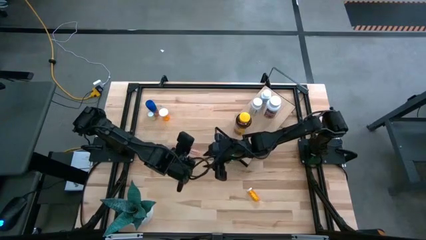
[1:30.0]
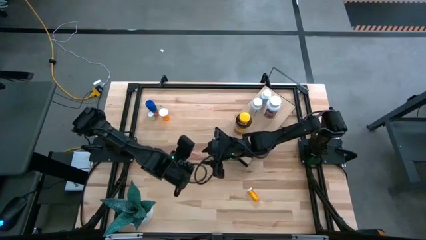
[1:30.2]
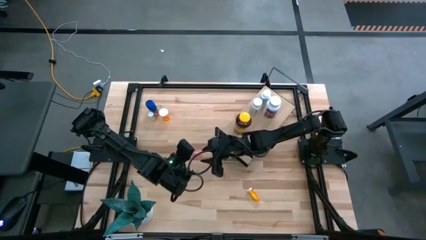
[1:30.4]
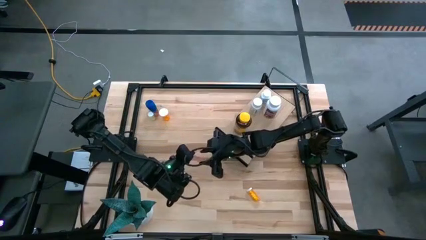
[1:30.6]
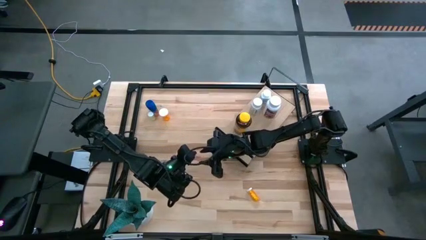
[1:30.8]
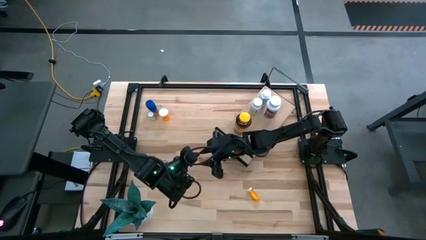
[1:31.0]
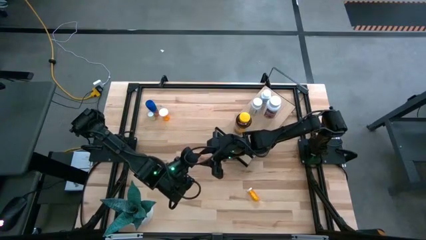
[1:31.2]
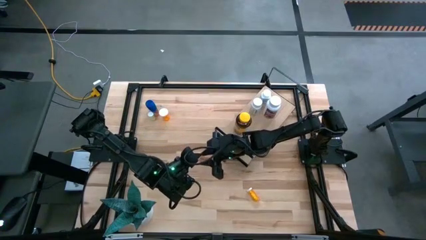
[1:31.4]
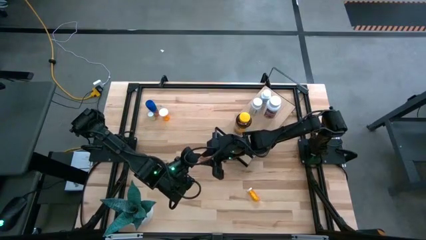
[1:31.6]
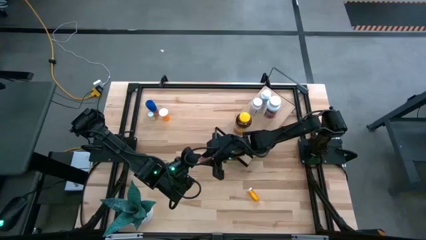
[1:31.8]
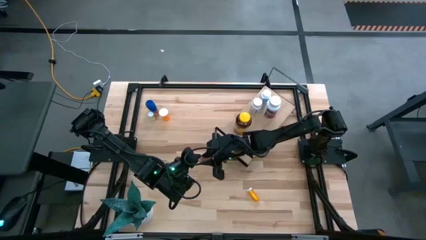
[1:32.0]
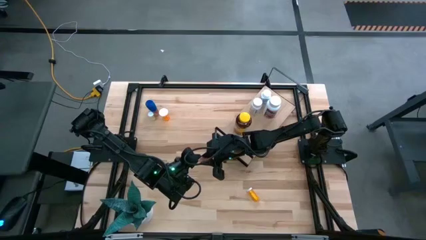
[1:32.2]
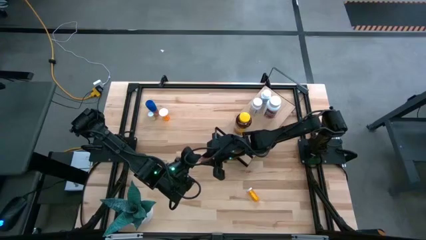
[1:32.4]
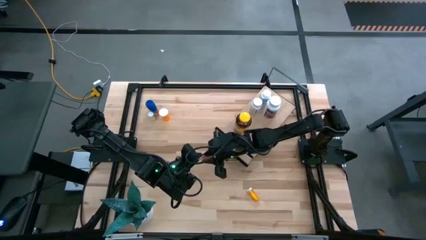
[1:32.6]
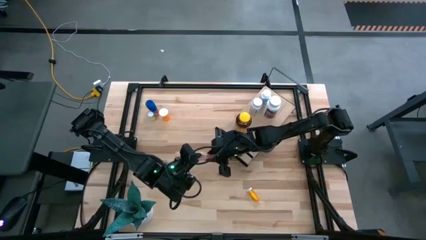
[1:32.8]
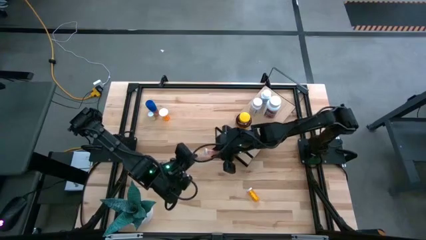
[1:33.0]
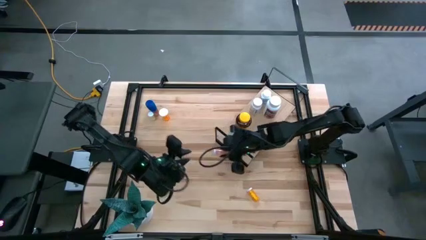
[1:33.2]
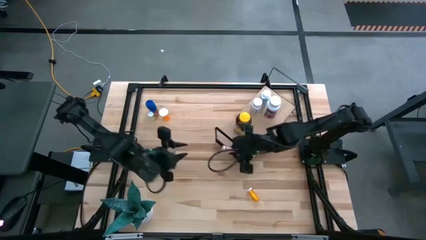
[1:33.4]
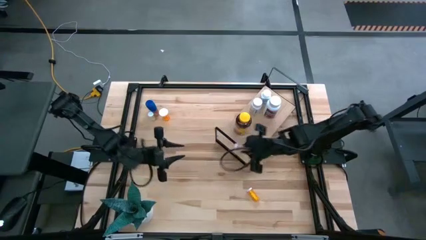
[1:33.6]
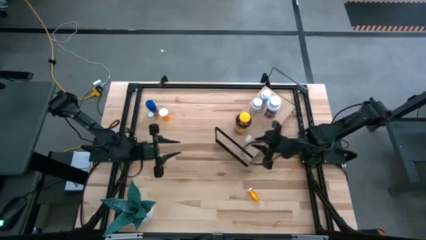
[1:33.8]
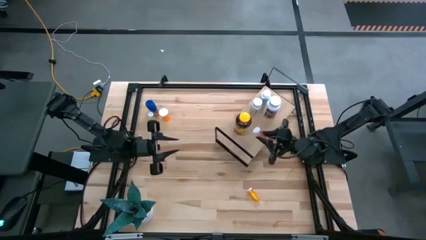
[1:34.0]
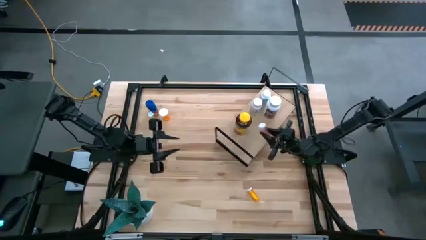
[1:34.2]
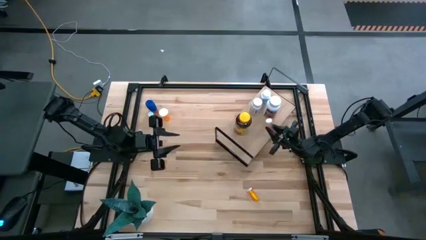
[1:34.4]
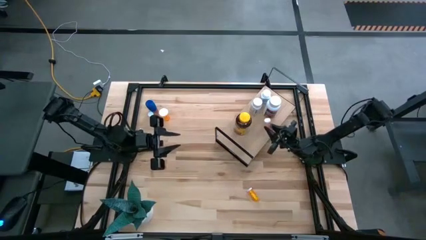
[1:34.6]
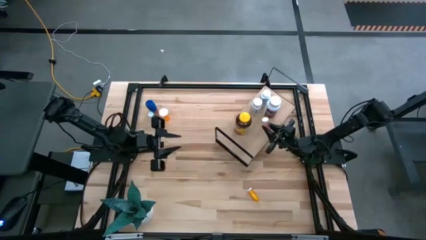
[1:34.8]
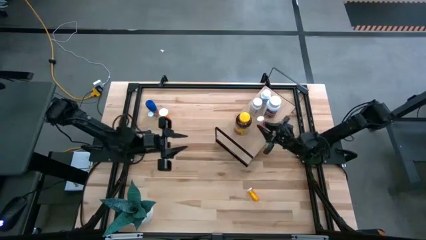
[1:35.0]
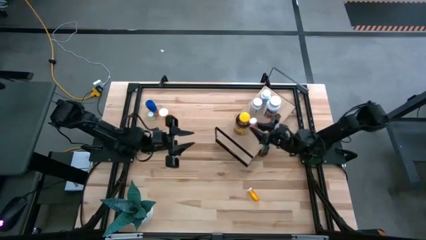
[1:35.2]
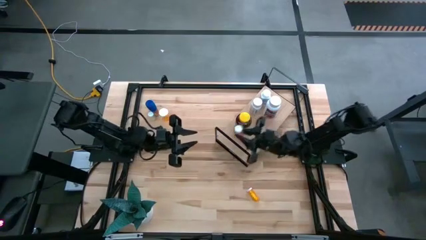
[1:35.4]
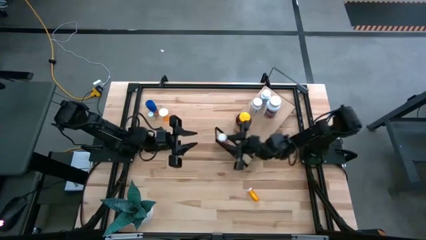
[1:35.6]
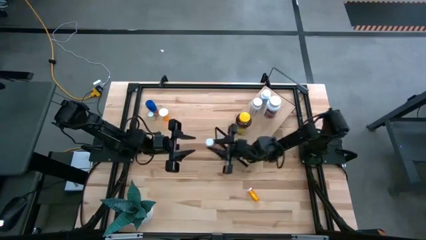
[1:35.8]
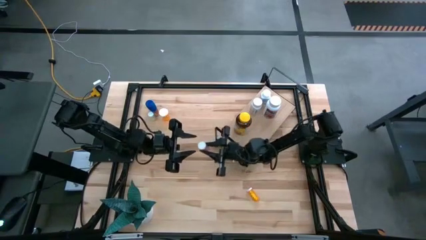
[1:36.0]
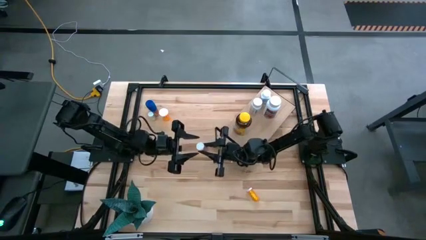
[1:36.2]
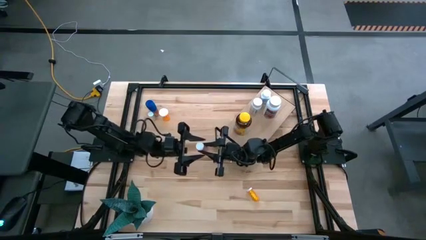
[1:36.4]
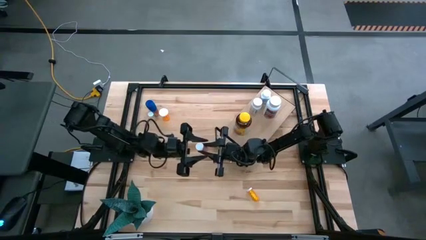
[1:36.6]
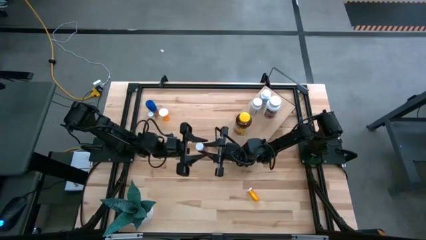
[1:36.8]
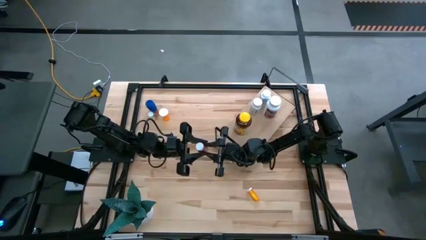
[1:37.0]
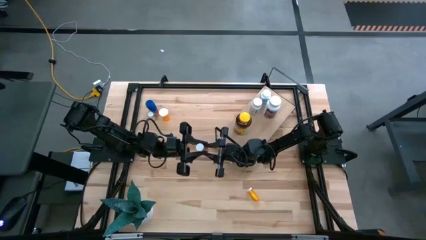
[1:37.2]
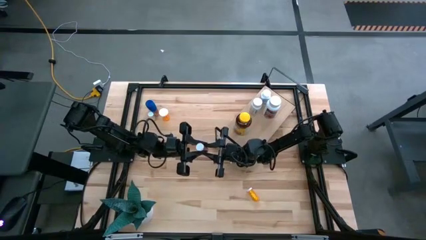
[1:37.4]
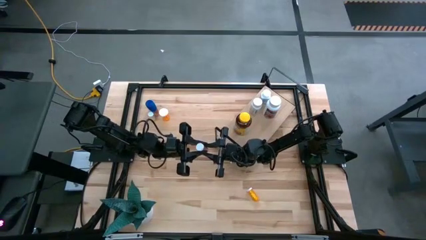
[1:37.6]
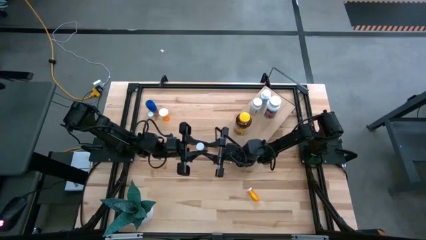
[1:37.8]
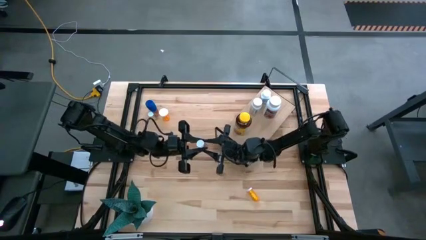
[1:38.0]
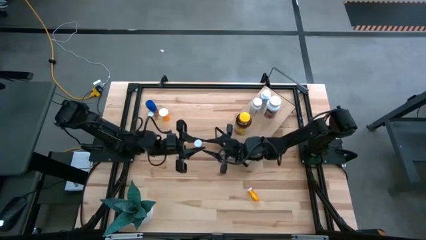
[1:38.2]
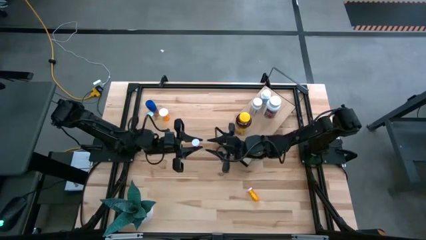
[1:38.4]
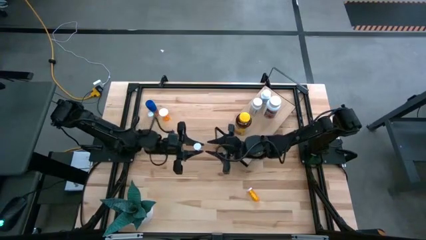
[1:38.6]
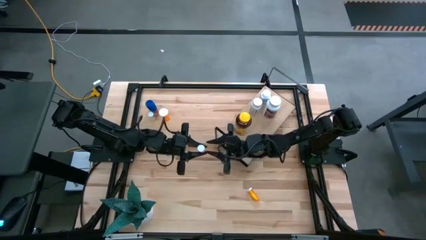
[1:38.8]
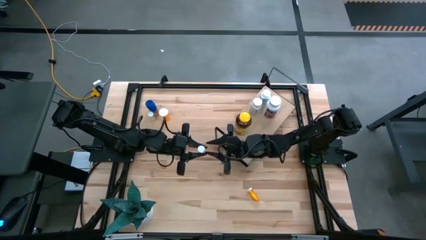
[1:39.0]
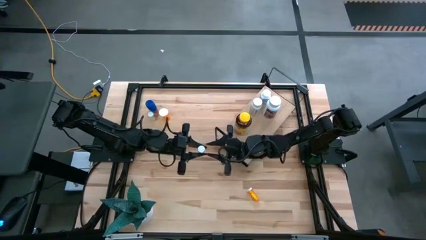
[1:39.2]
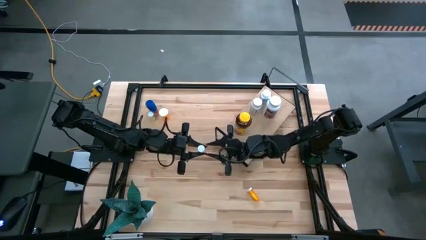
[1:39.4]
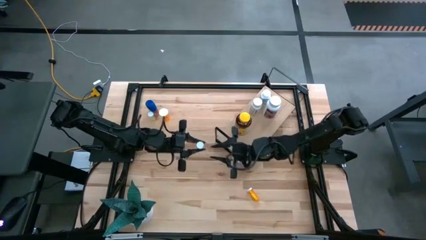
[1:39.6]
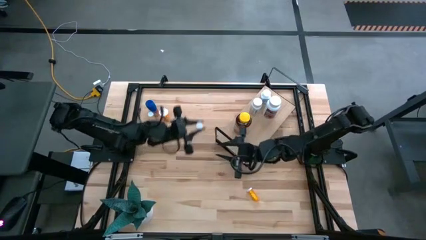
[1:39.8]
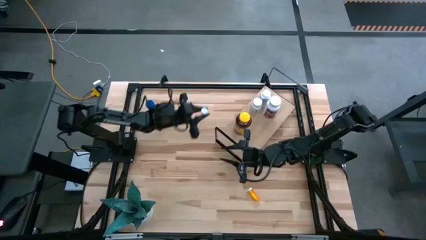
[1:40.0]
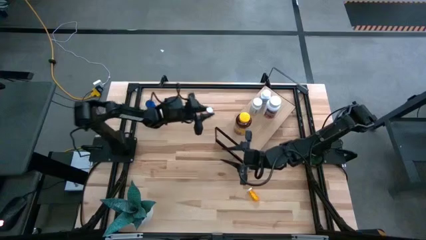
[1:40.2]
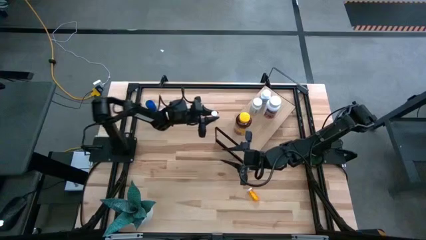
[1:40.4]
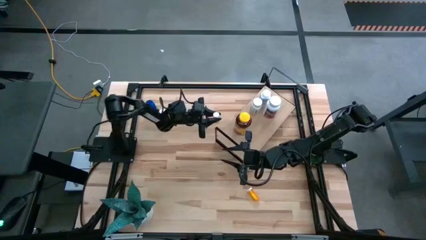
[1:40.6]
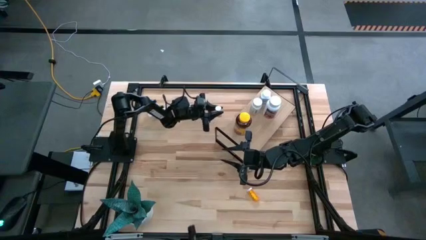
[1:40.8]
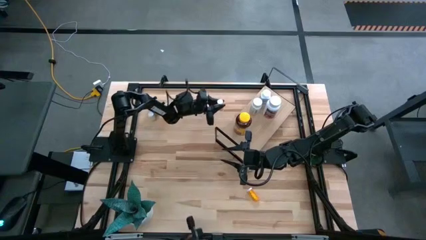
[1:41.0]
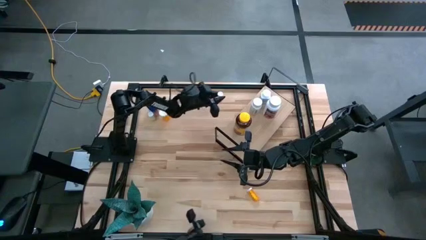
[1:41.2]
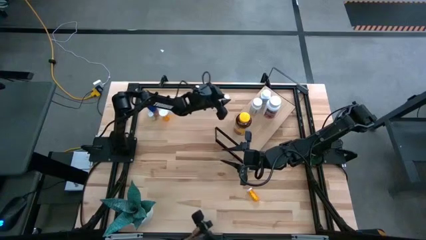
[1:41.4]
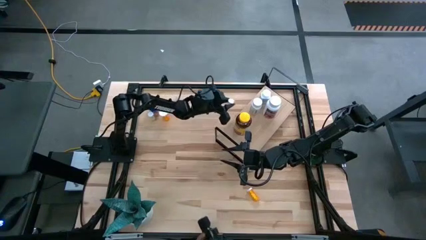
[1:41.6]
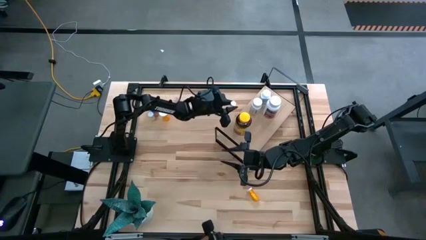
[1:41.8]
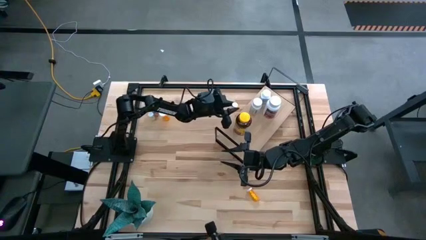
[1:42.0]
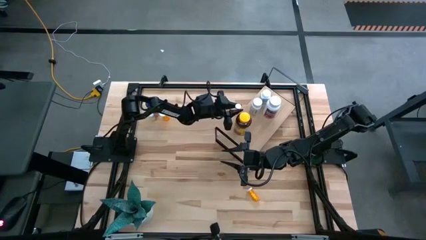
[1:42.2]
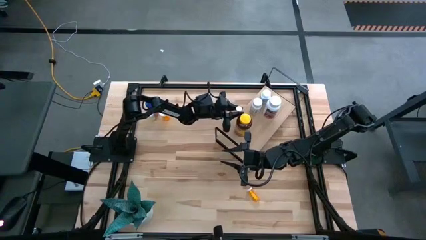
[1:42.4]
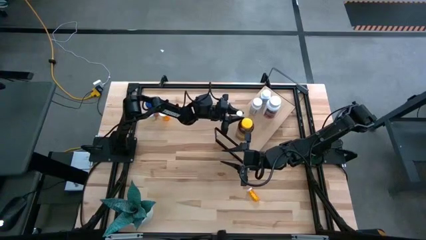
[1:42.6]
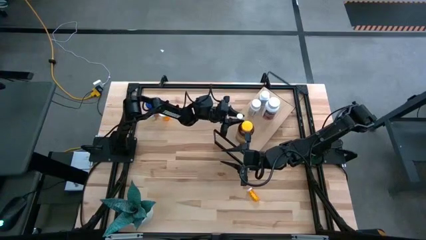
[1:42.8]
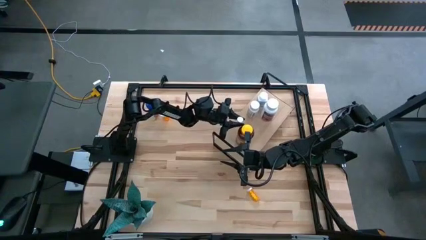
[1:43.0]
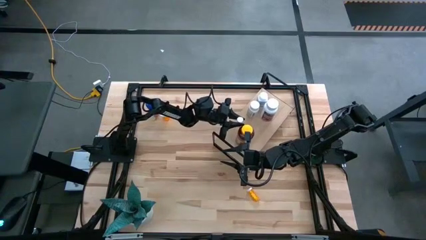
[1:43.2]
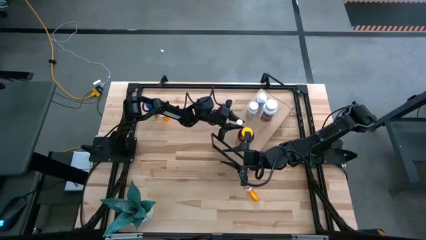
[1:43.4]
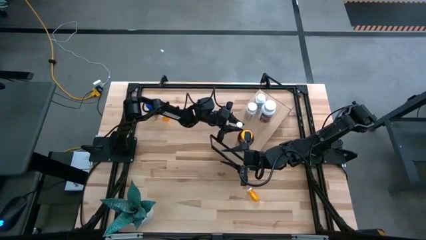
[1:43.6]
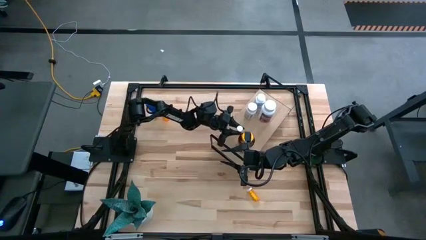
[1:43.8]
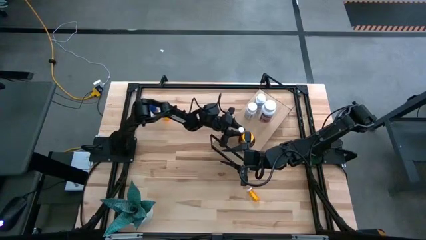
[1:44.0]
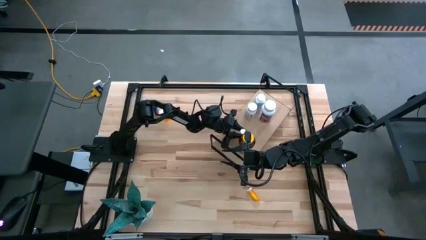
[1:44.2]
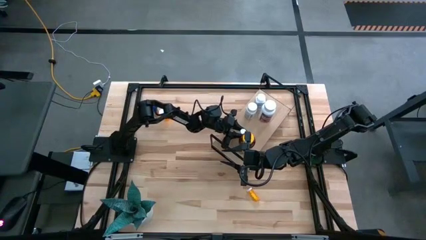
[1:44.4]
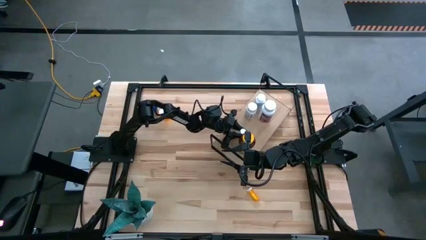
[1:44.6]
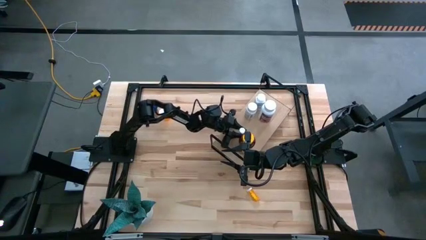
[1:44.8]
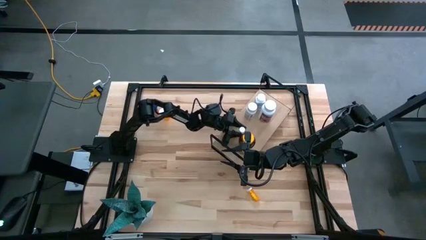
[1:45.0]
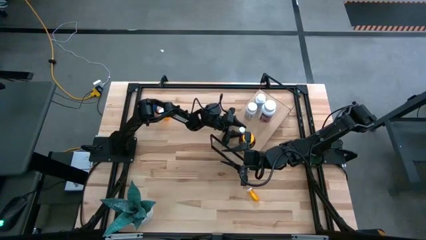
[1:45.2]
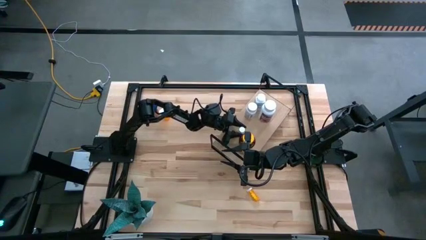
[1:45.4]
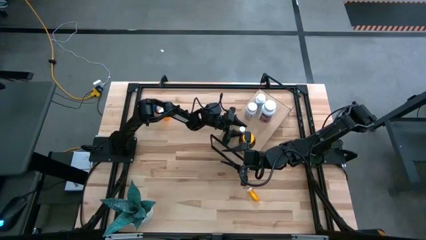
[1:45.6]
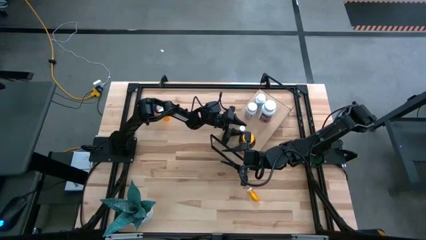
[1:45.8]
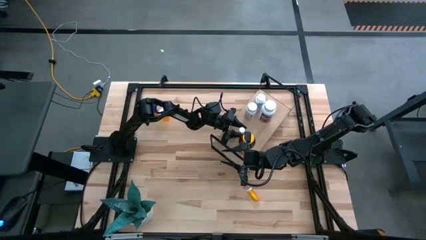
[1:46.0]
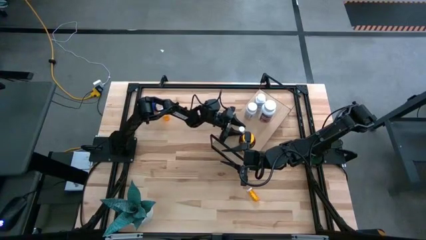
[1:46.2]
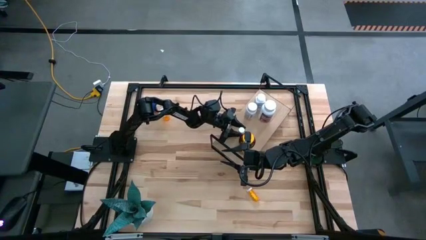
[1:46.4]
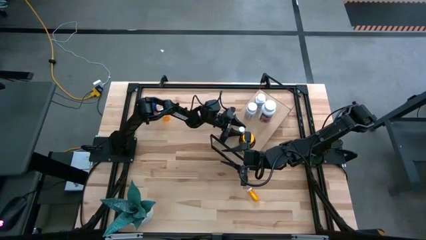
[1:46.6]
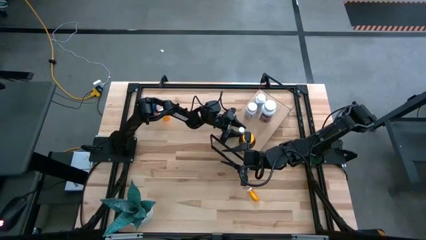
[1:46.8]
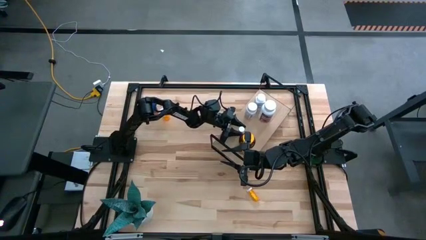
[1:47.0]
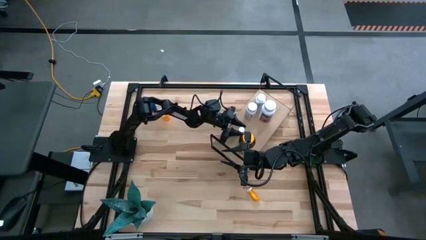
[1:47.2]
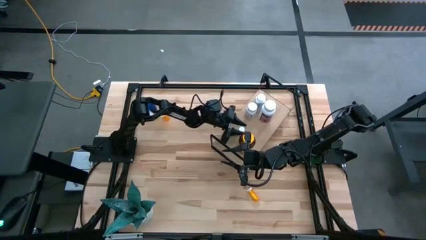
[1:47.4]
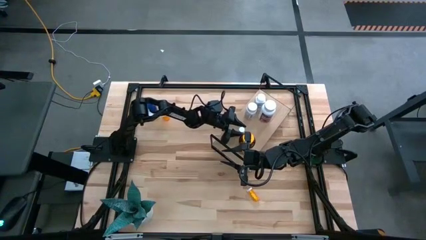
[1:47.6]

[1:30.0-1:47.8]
Task: Pick and place medicine bottles onto shelf by color
Put the red pill bottle on the shelf
